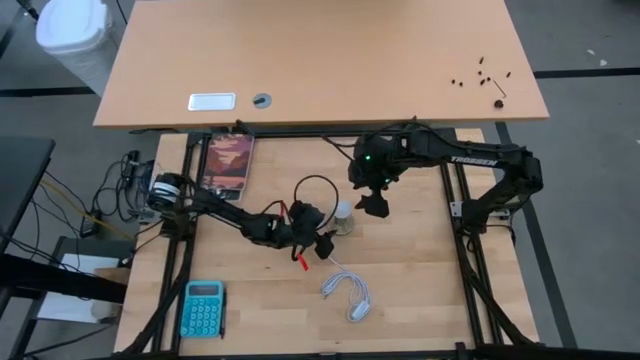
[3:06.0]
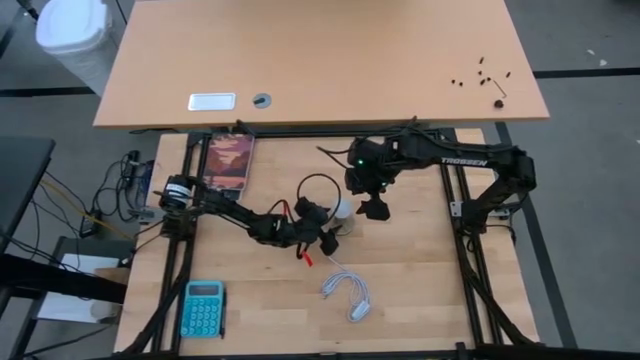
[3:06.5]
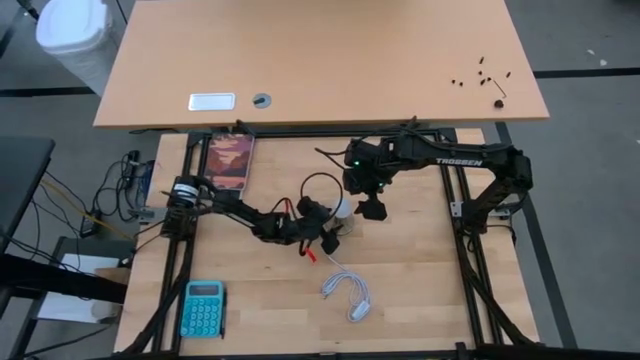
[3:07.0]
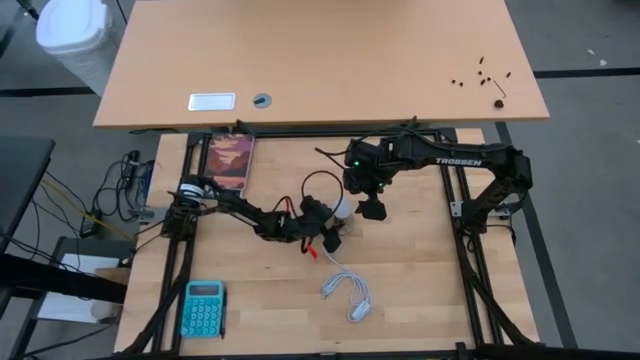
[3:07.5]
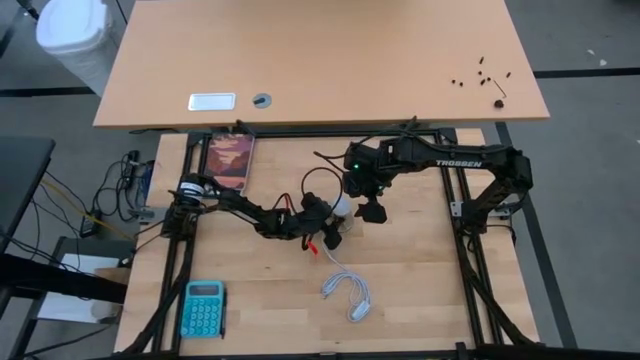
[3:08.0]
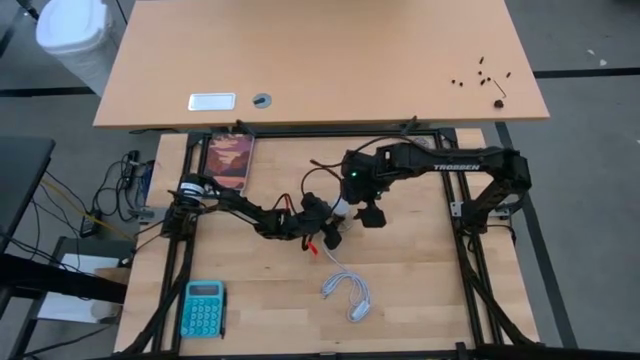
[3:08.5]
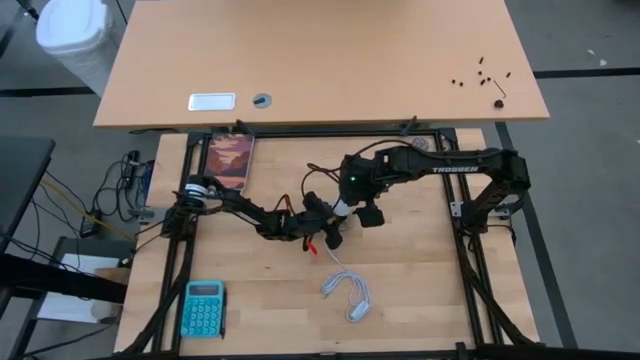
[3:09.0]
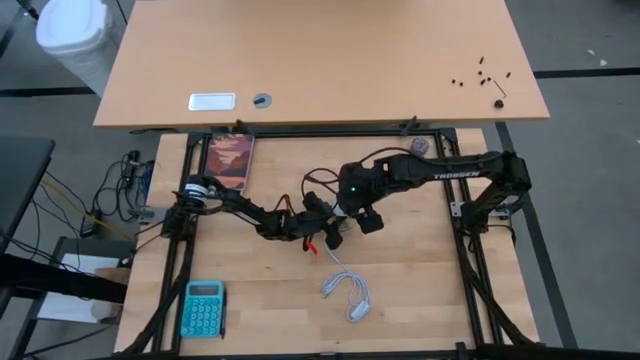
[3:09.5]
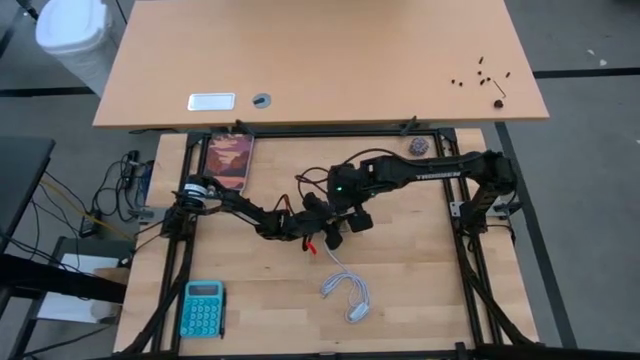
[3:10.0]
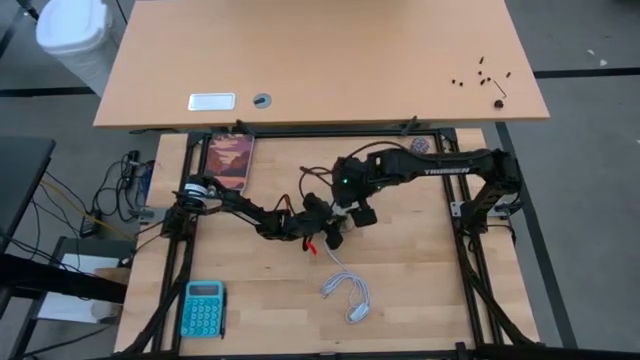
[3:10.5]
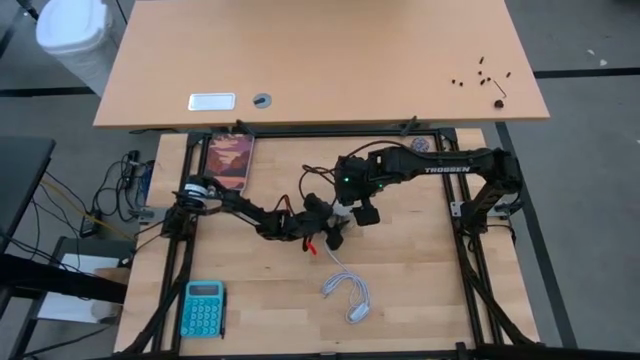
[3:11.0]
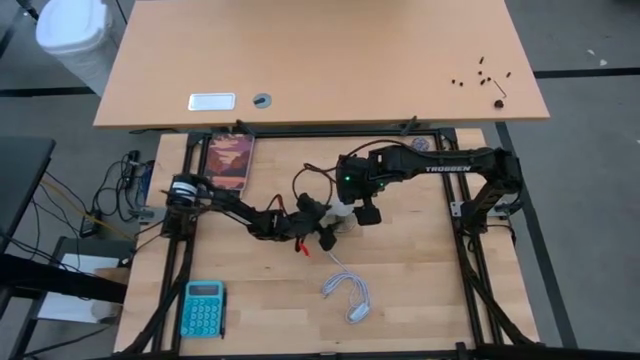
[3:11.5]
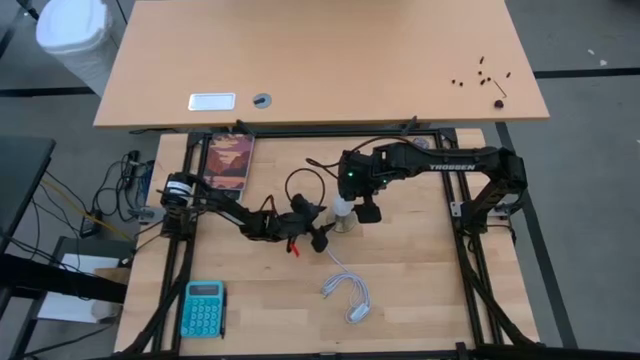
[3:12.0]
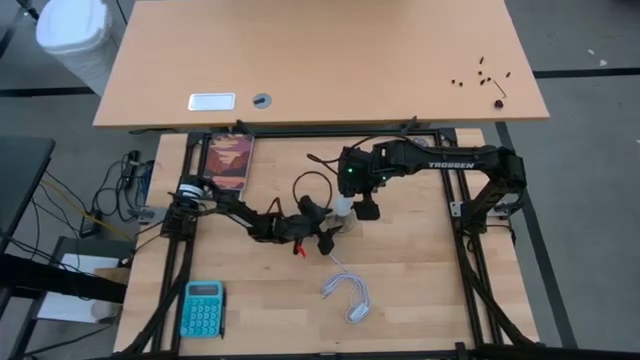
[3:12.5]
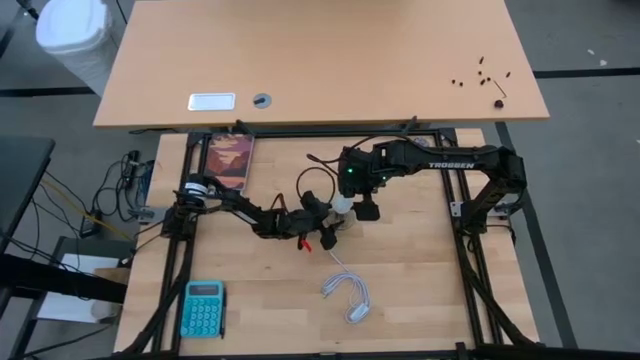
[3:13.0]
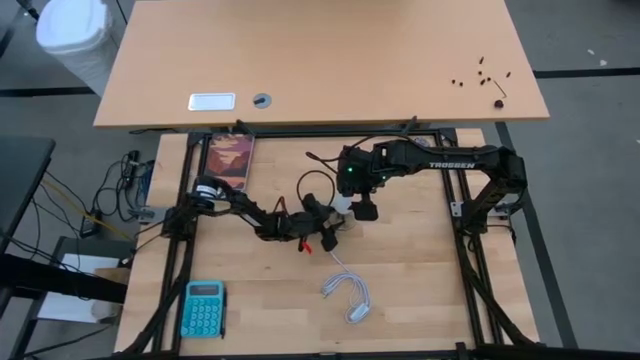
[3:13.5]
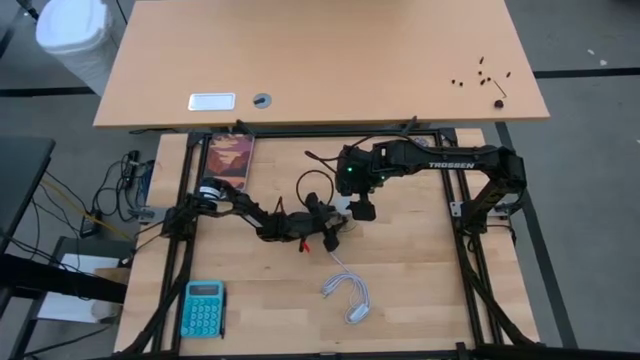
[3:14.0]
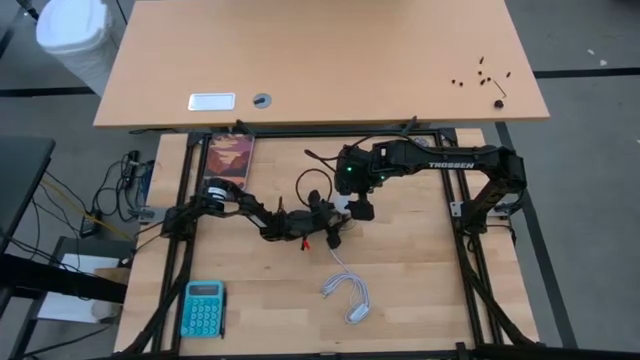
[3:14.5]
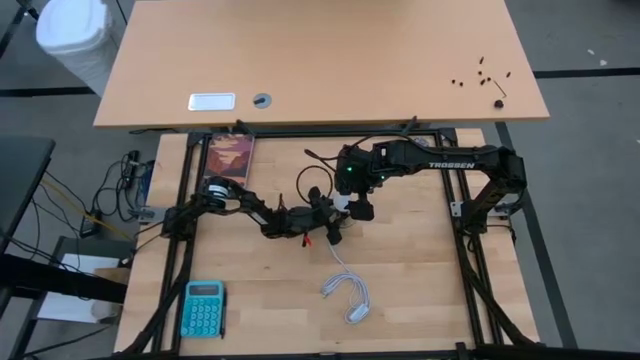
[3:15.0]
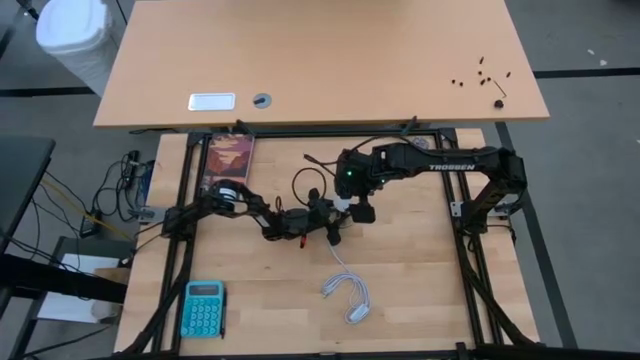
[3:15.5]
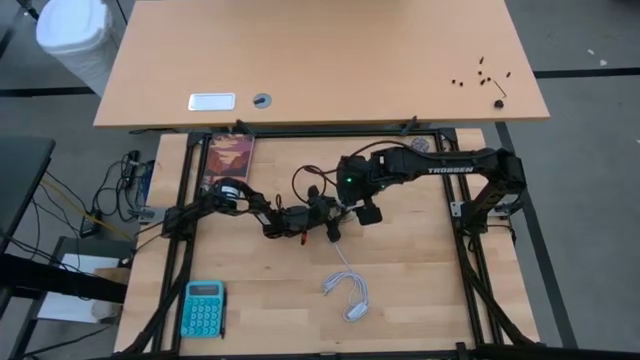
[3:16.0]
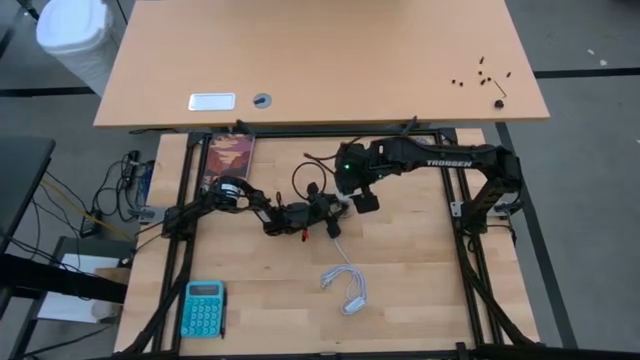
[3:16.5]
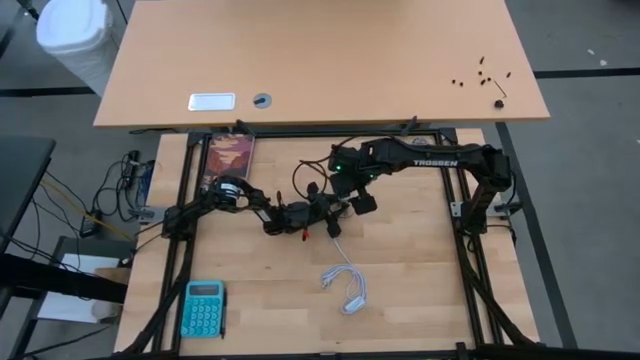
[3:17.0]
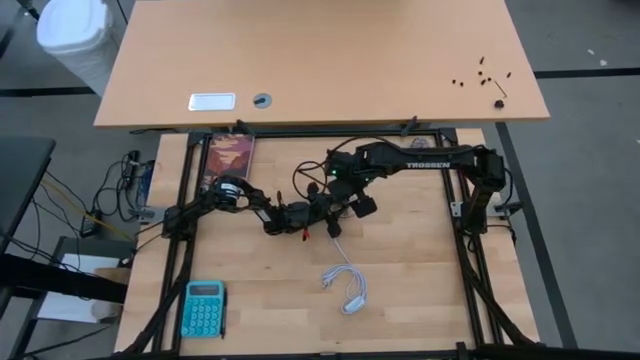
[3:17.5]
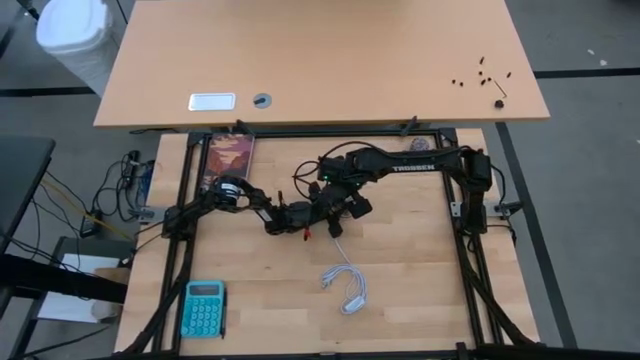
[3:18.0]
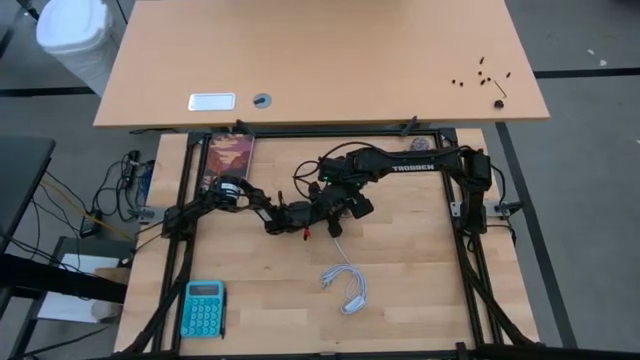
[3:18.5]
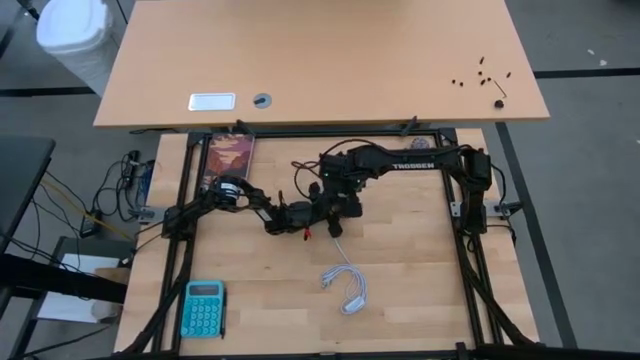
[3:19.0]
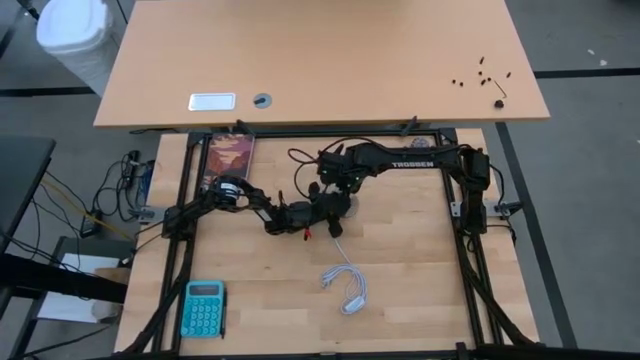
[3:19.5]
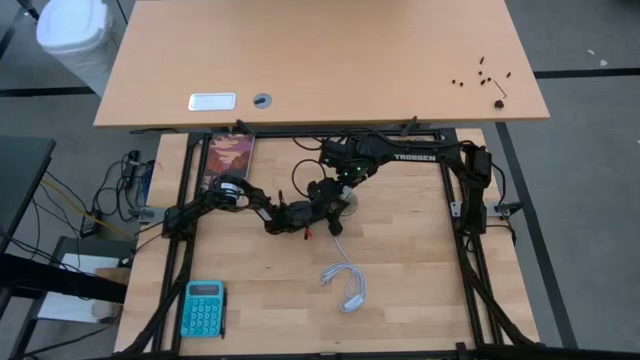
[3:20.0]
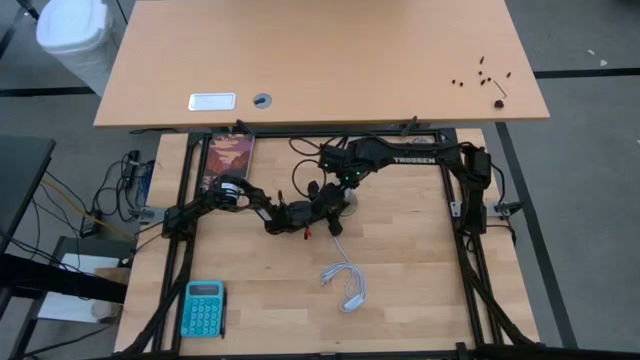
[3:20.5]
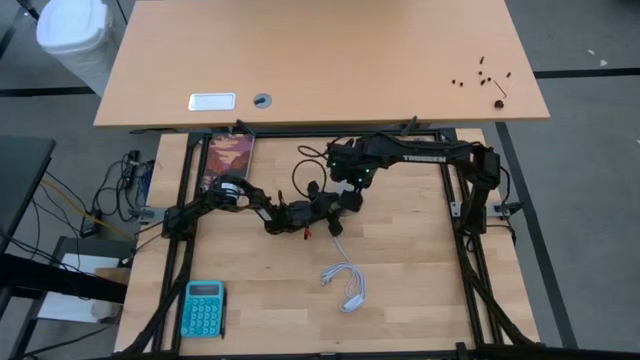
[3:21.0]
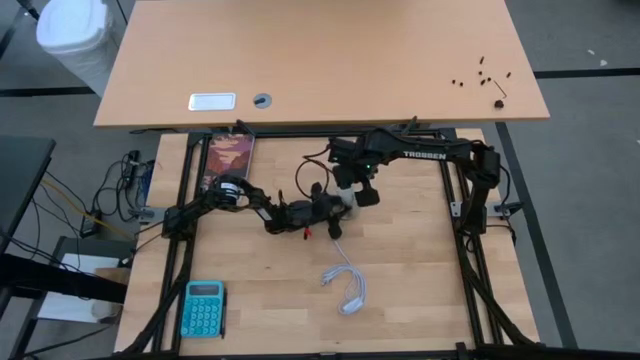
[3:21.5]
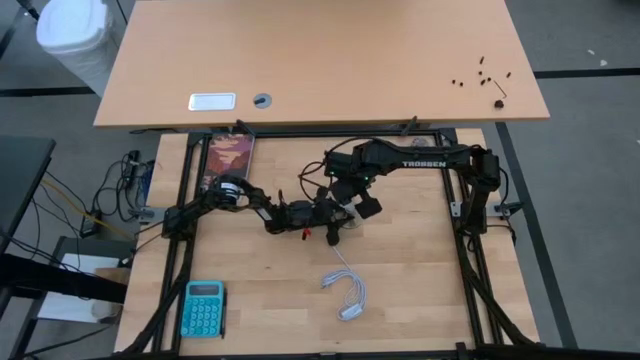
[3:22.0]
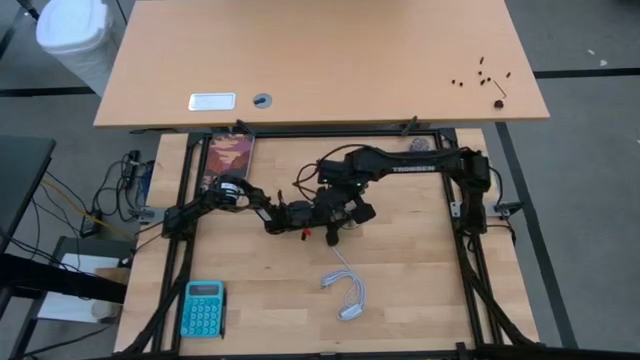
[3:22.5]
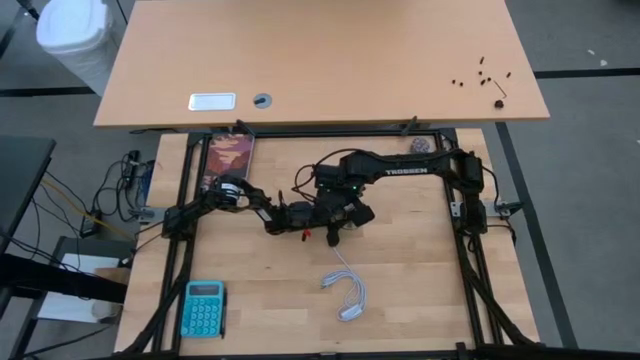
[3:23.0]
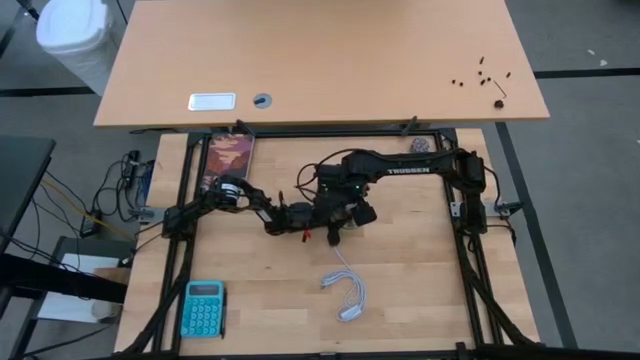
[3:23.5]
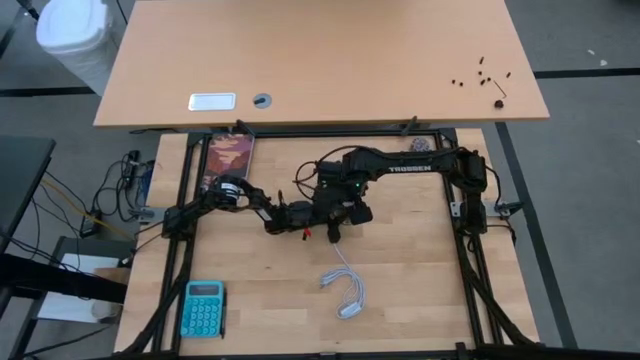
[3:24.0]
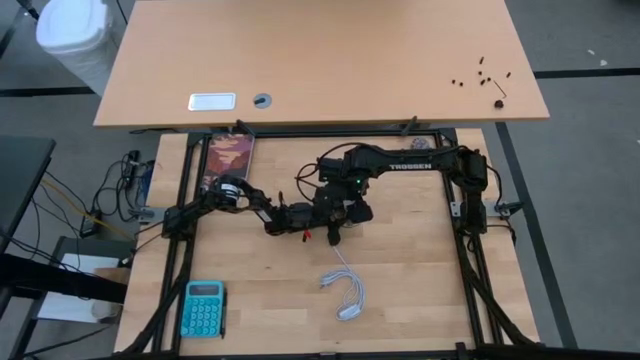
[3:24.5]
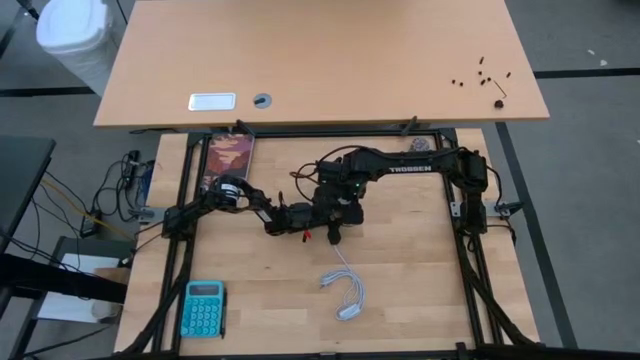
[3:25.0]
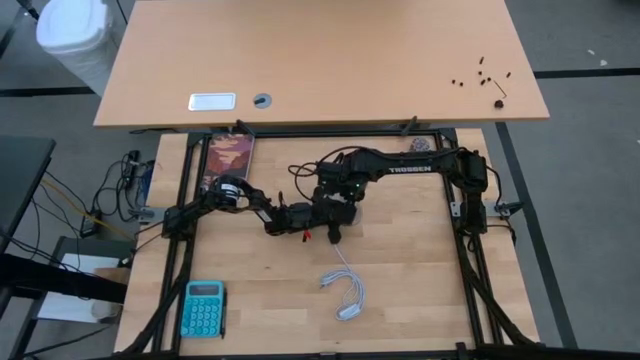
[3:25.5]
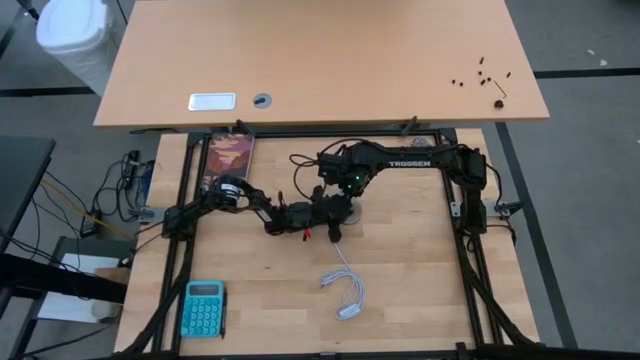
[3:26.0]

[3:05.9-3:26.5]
Task: Screw lightbulb
Insert the lightbulb into the desk lamp
